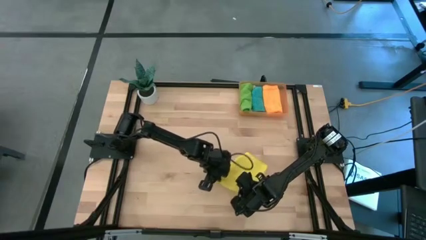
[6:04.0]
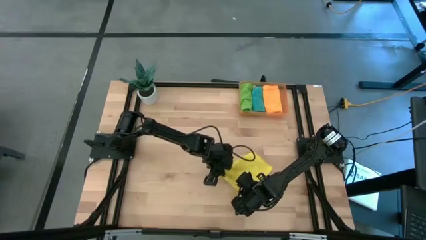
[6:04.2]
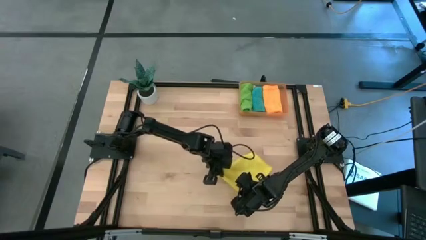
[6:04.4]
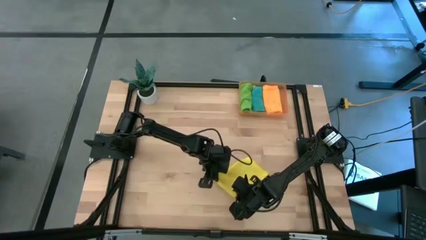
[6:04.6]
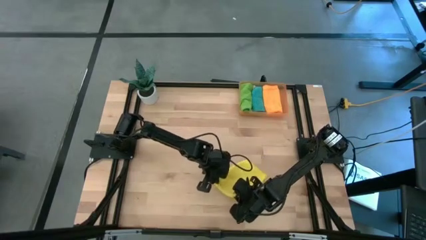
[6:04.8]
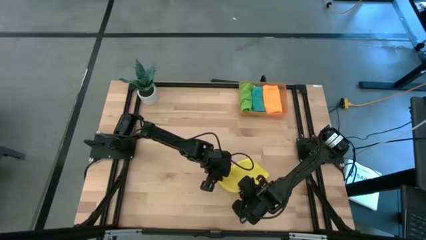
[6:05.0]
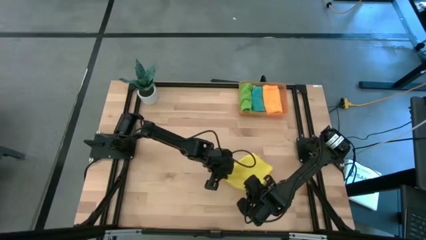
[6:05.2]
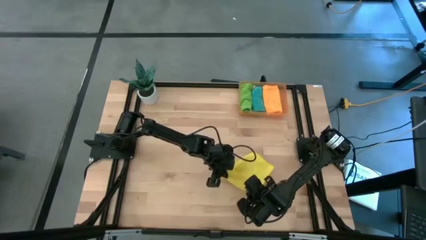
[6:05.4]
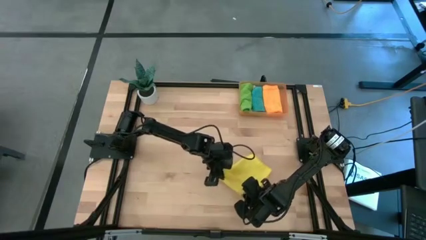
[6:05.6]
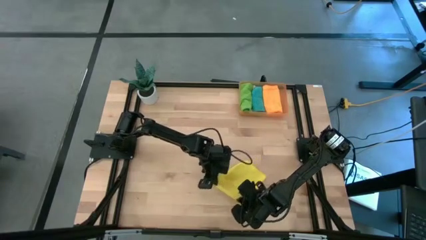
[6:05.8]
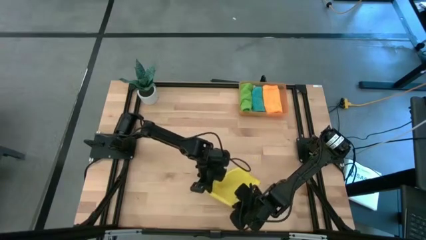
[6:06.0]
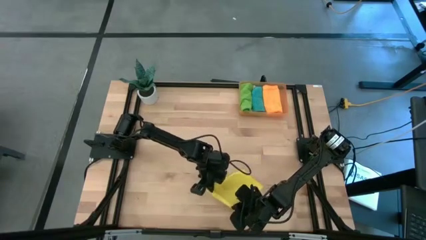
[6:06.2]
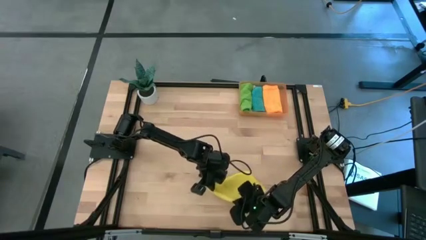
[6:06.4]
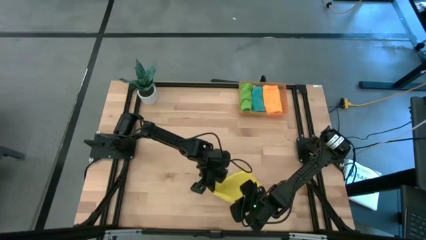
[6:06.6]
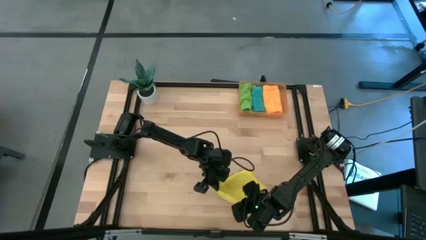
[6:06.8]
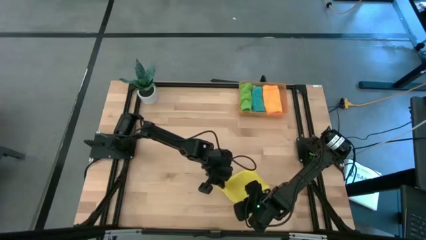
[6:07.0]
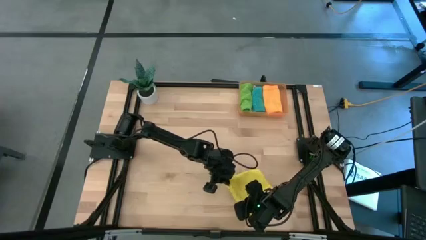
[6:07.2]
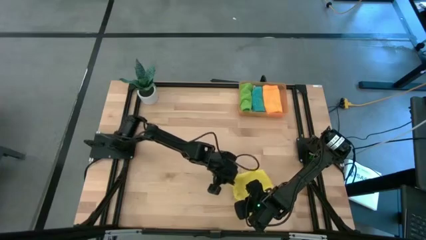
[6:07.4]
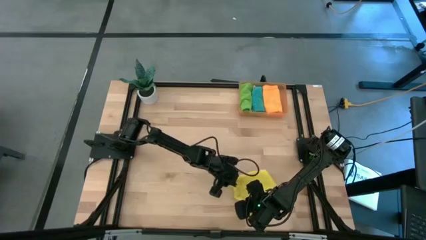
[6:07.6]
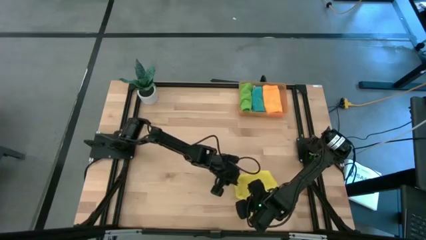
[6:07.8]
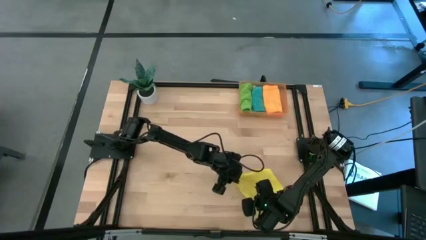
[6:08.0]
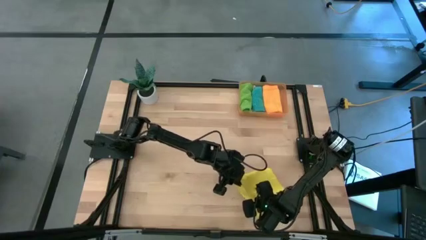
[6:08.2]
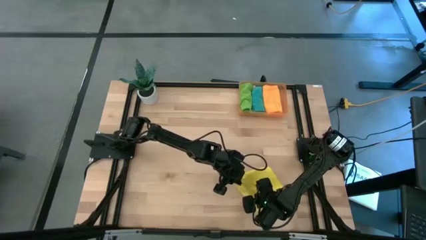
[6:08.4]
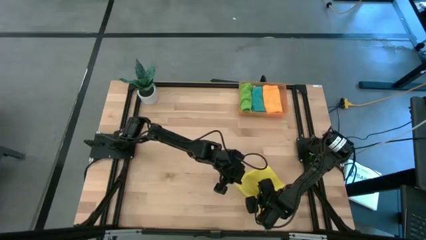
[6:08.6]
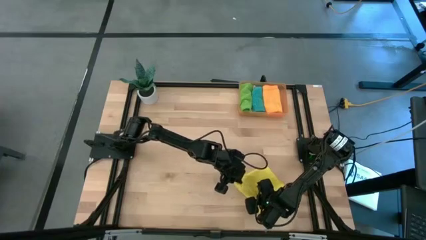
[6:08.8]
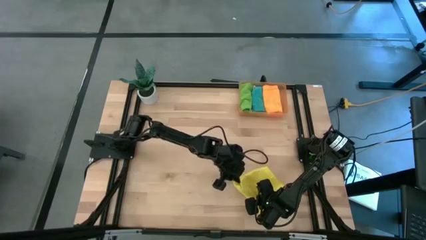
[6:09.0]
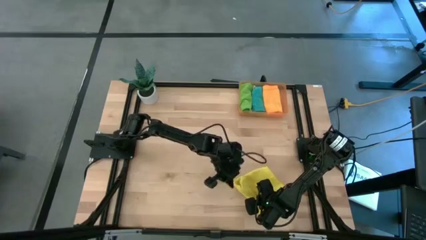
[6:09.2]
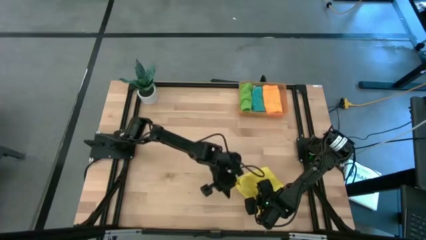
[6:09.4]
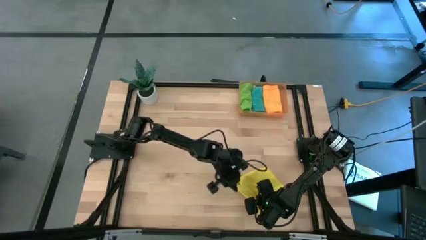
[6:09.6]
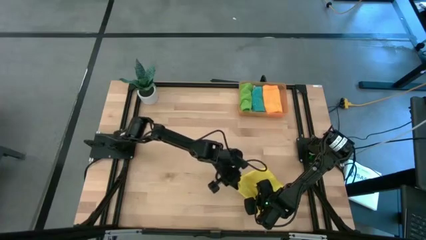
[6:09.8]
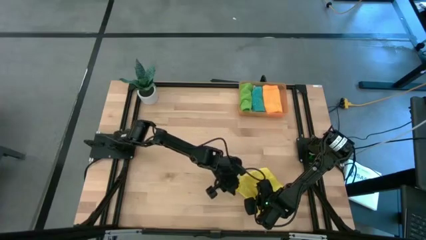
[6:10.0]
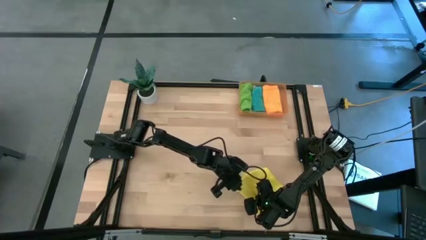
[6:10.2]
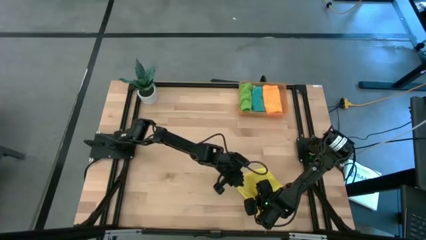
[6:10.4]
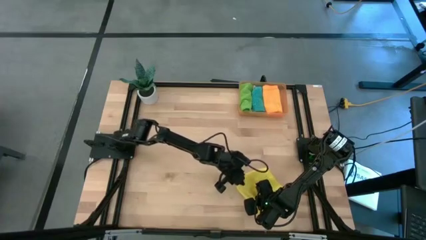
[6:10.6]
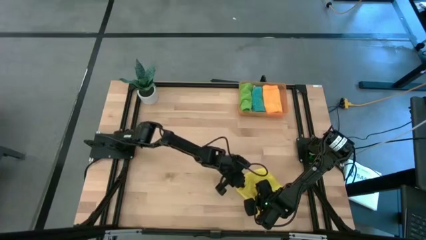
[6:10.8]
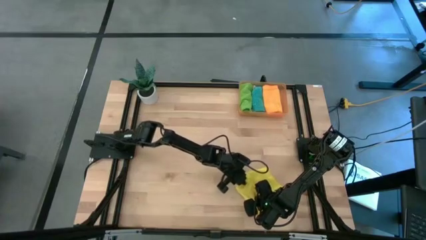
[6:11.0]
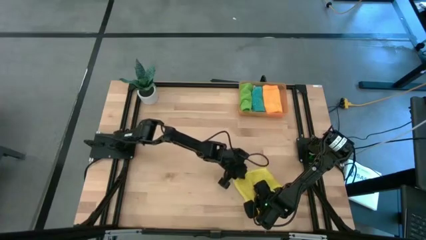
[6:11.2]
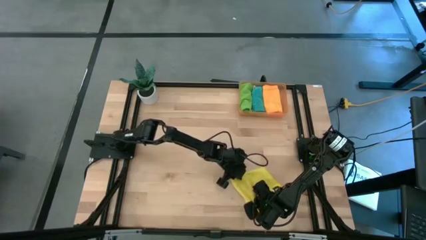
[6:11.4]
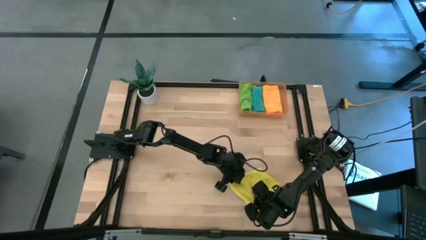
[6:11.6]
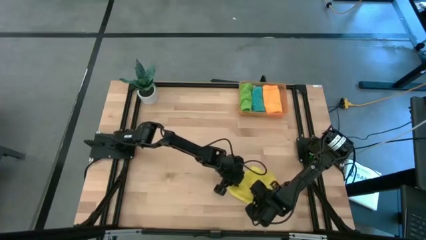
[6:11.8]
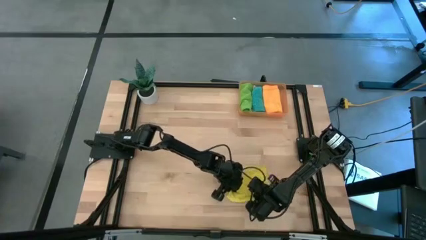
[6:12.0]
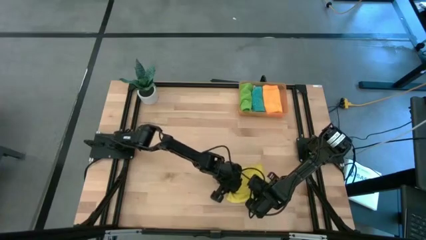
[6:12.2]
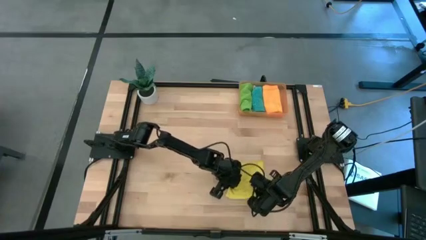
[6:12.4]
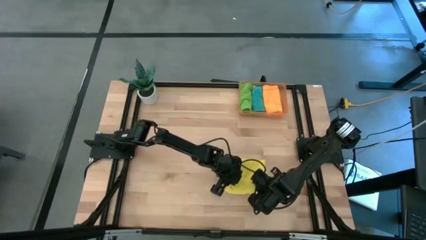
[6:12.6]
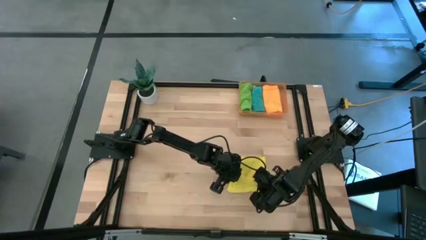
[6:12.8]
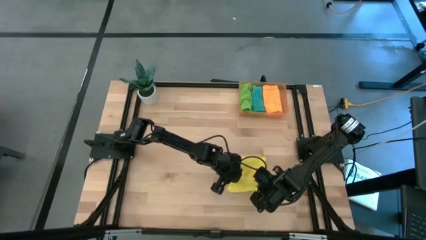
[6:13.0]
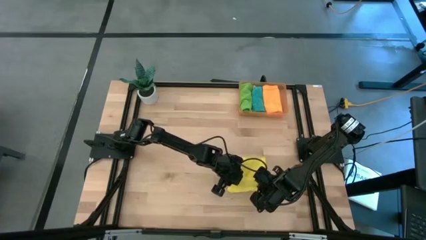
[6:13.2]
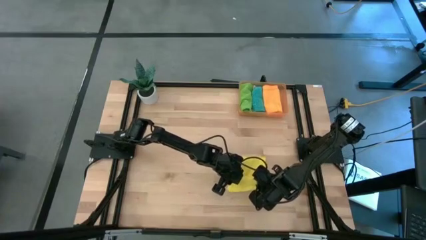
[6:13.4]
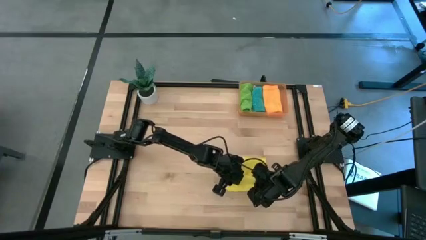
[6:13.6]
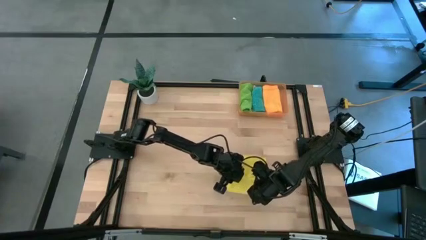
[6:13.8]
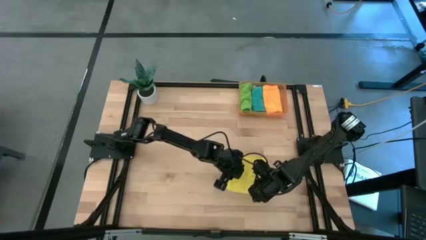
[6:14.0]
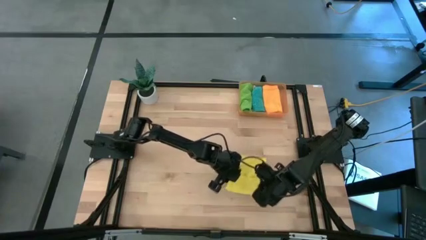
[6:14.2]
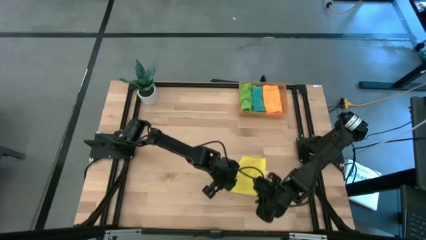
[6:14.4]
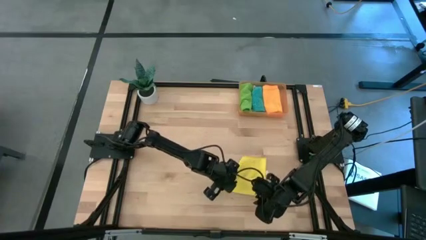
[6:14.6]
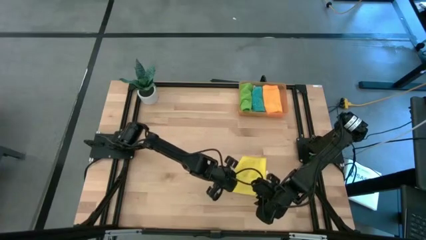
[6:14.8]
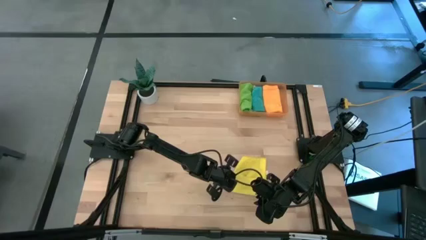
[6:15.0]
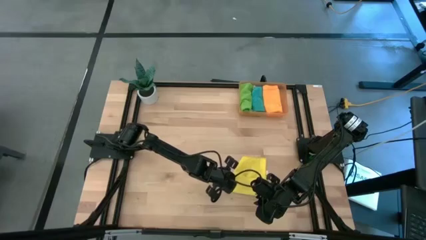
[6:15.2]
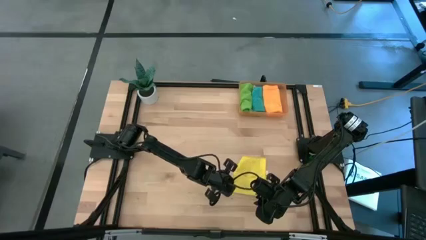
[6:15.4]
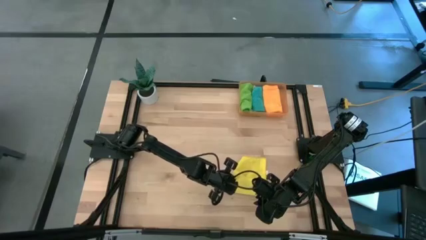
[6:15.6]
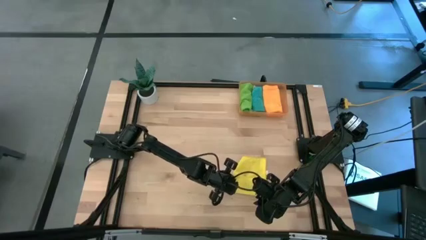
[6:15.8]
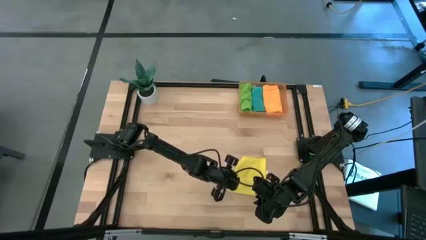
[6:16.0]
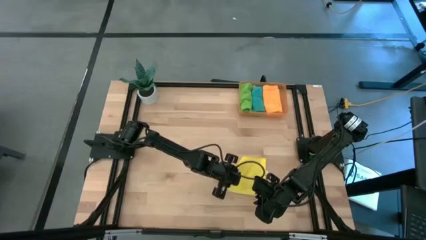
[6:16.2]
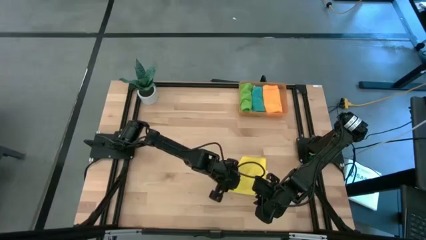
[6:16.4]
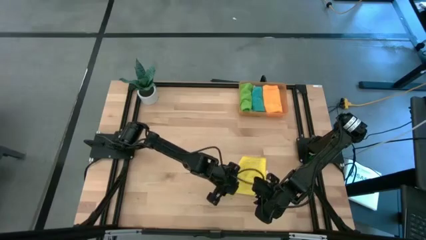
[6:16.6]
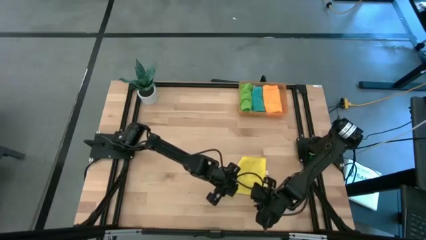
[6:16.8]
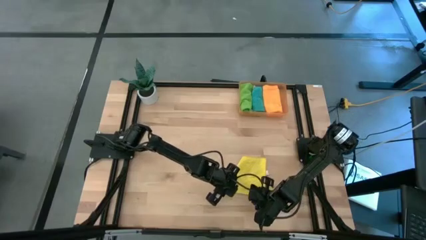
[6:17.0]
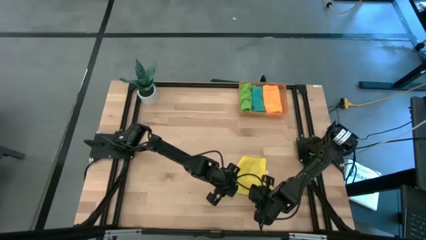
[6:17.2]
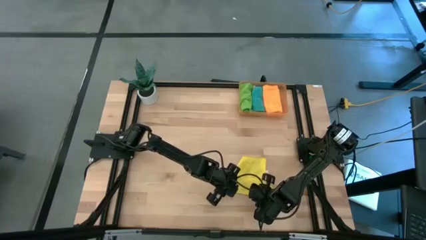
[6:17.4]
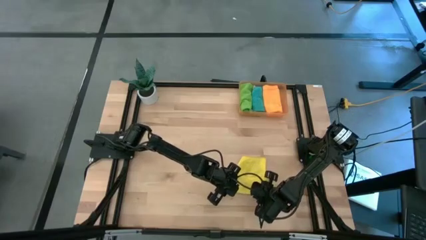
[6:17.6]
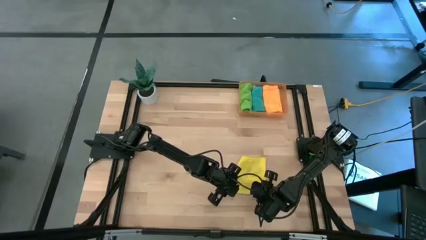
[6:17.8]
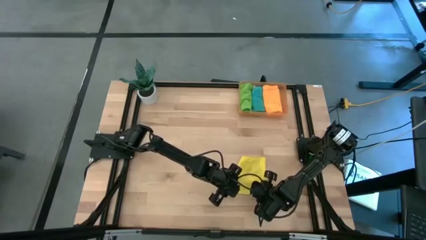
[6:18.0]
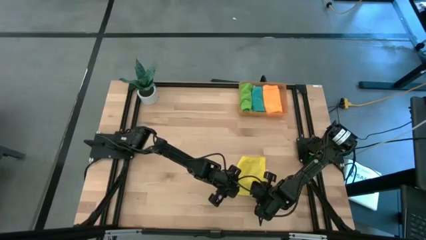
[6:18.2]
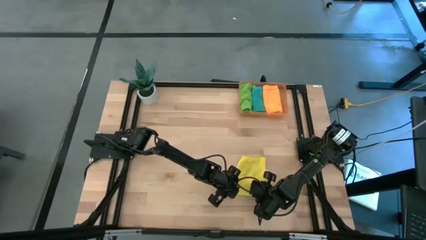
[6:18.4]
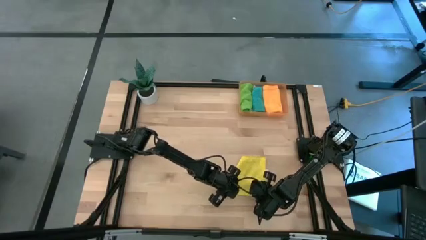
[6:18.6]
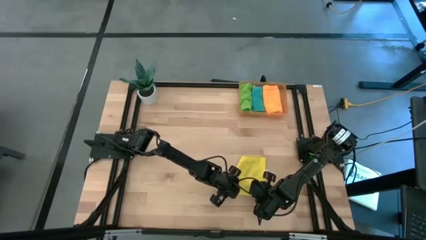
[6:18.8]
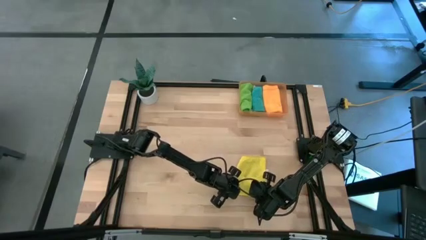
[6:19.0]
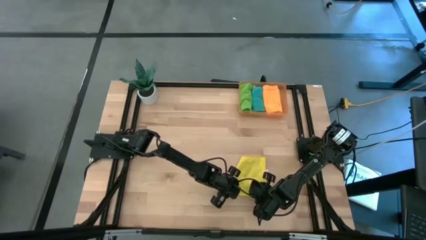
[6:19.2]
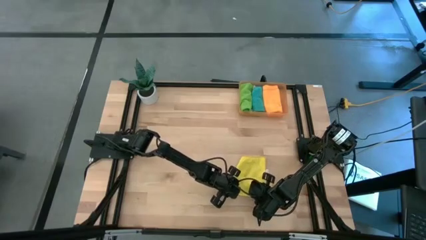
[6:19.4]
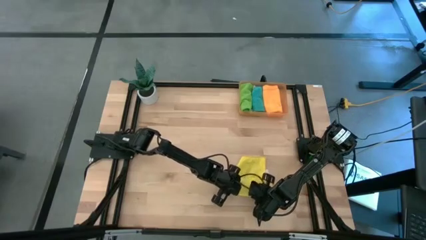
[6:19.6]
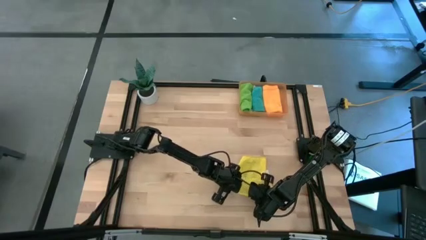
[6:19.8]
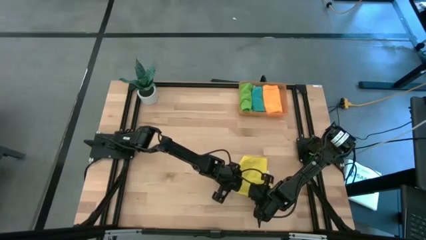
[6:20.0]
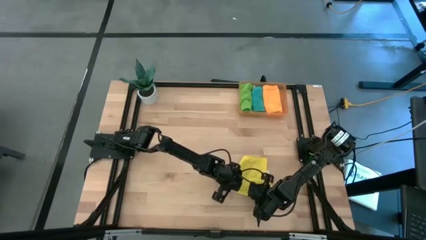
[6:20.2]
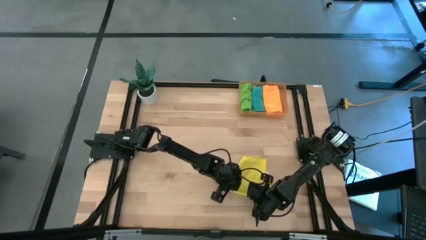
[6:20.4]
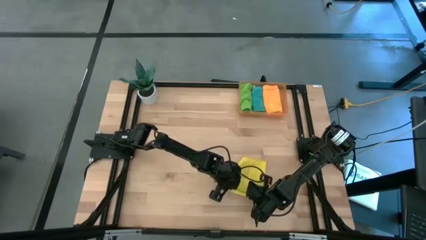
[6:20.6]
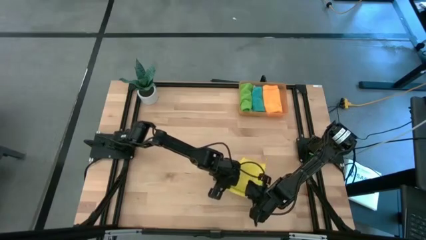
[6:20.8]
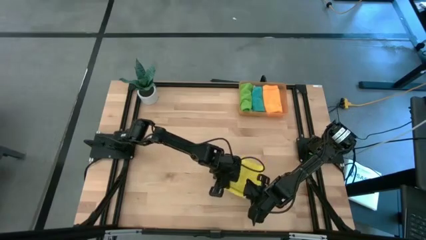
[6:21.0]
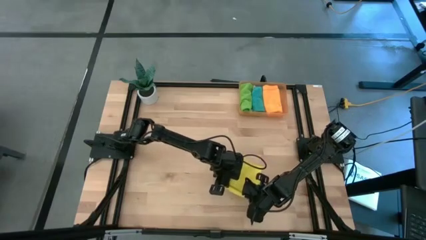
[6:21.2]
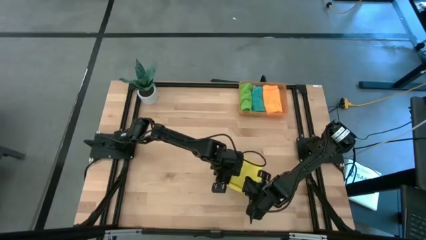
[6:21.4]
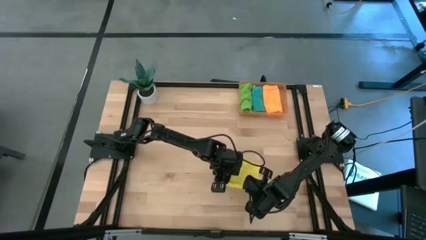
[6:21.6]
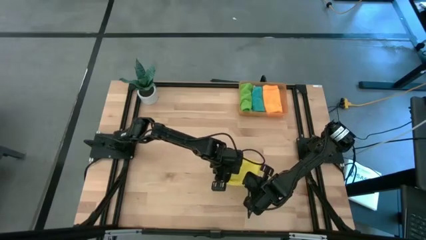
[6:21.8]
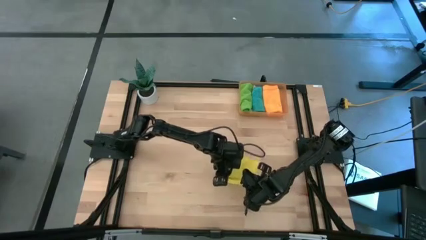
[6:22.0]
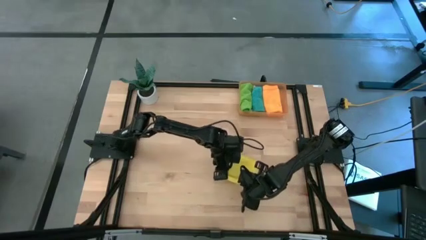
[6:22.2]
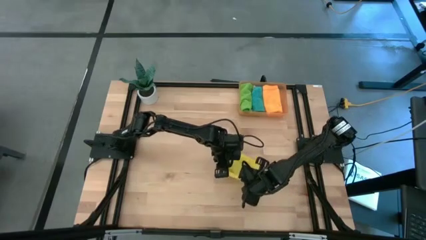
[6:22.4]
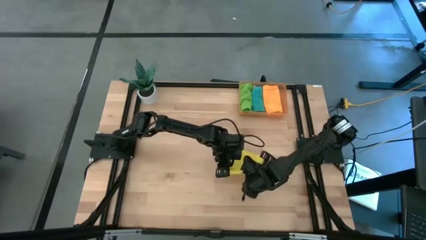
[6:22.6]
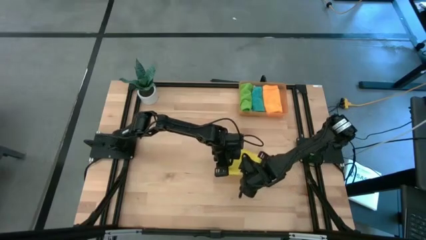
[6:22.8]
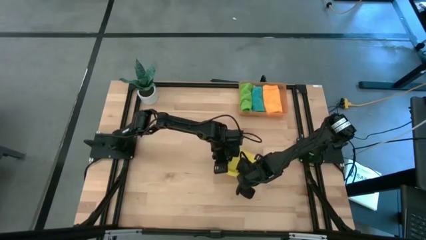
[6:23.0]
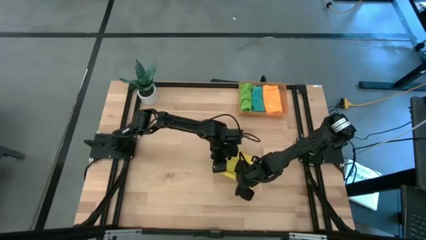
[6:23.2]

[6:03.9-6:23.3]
Task: Roll microfiber towels into tight, uniform cylinder then place into a basket
Fold the yellow towel
